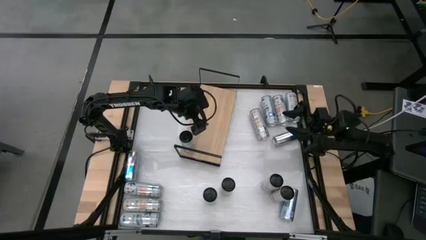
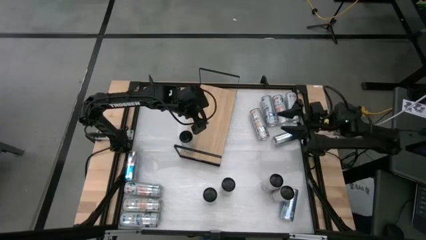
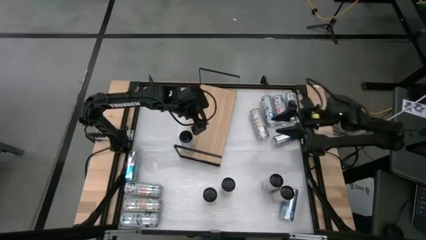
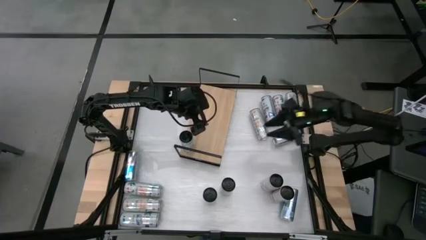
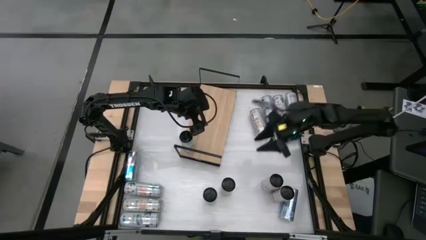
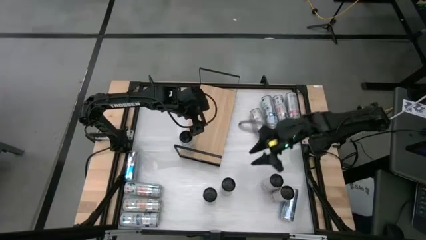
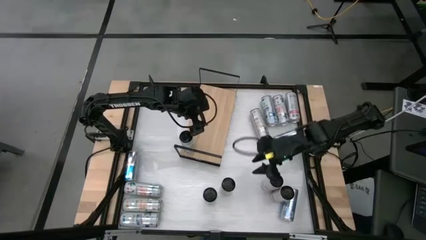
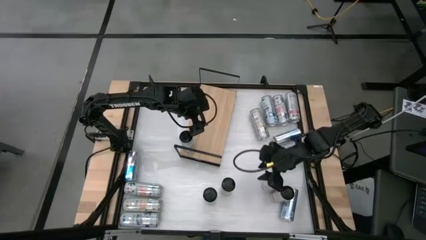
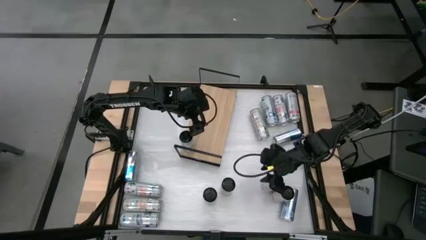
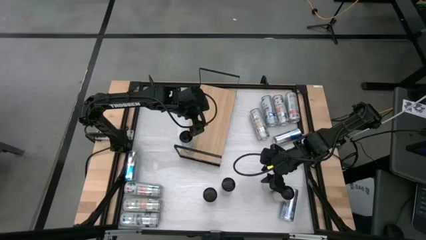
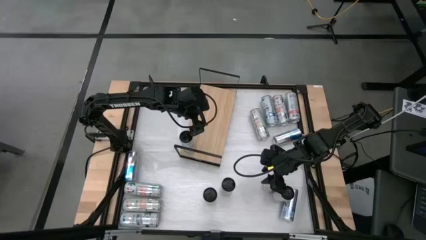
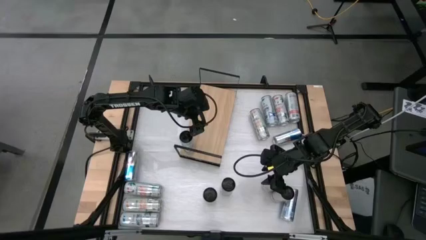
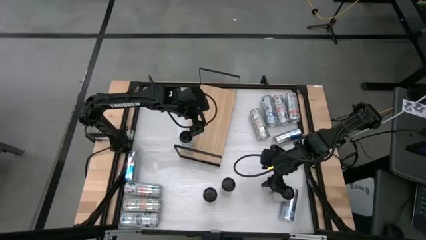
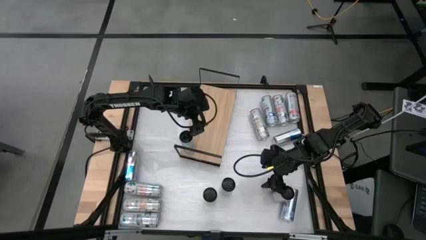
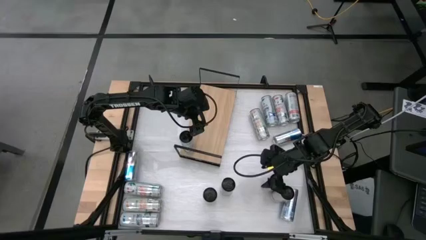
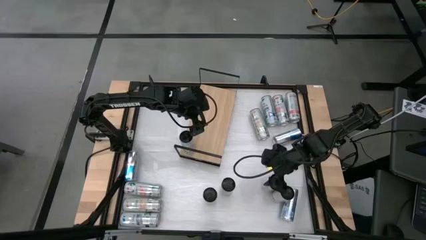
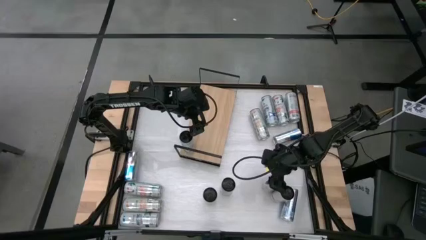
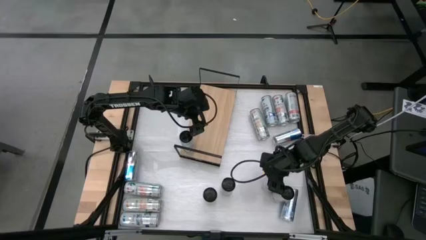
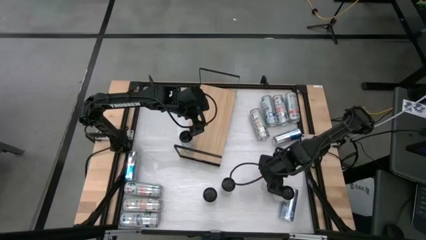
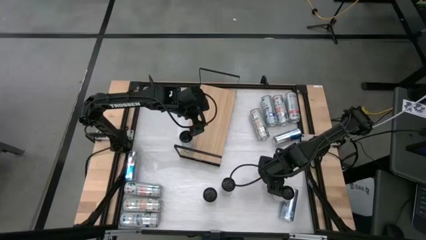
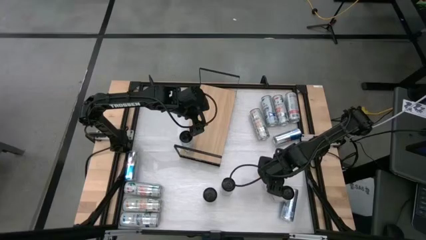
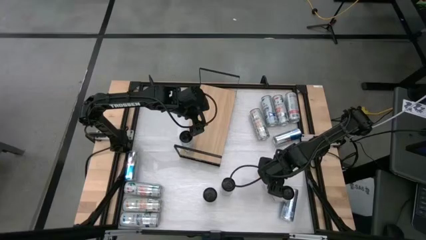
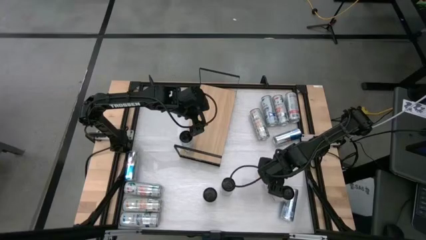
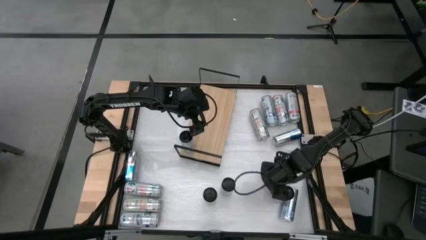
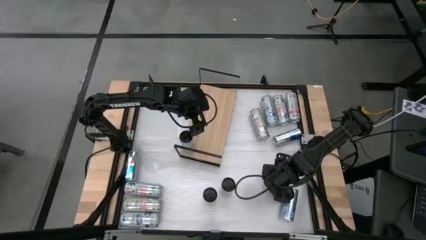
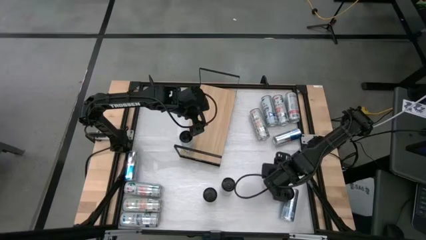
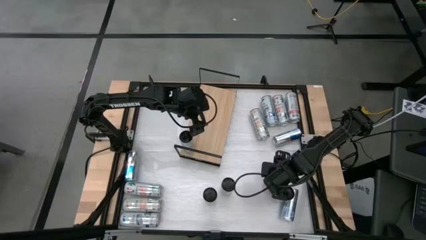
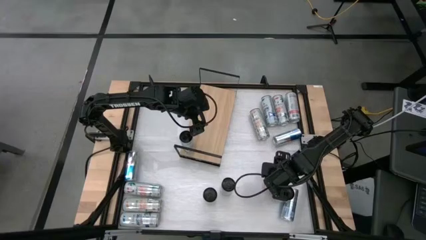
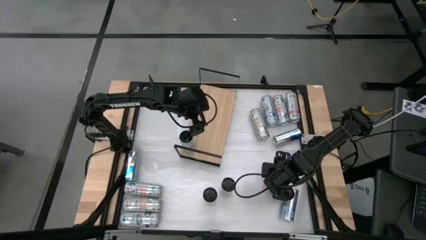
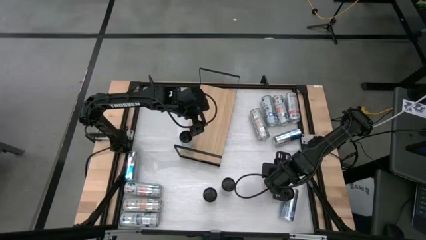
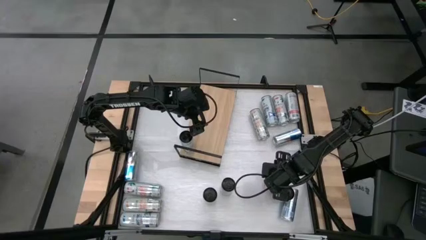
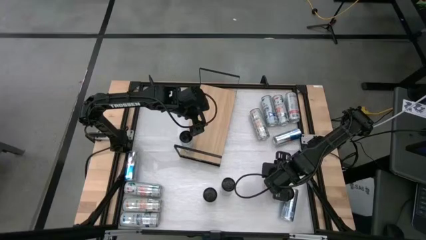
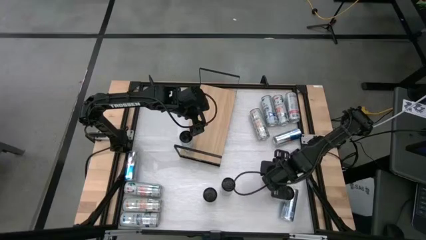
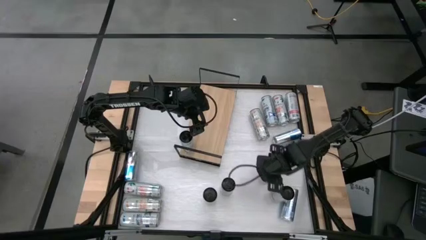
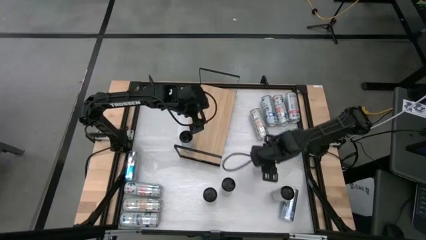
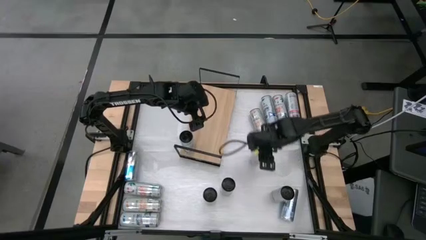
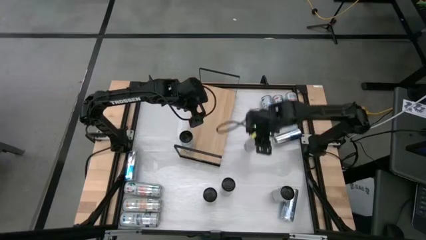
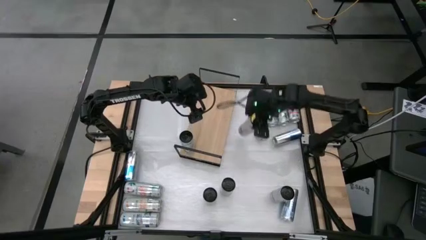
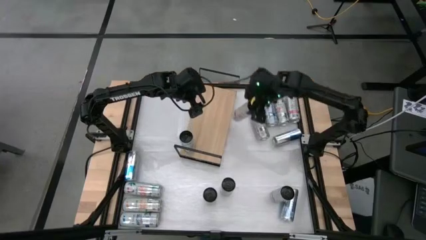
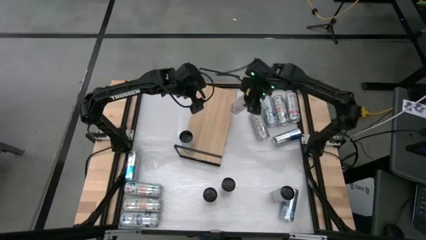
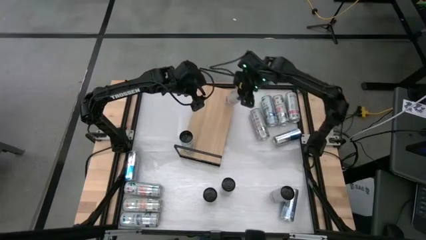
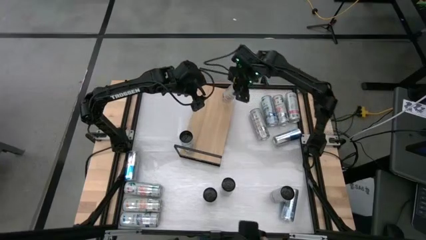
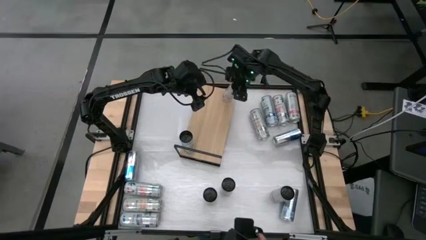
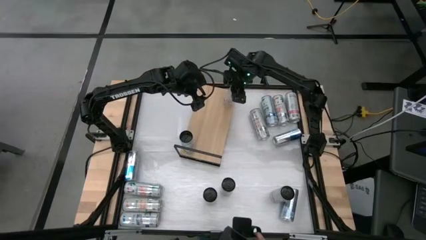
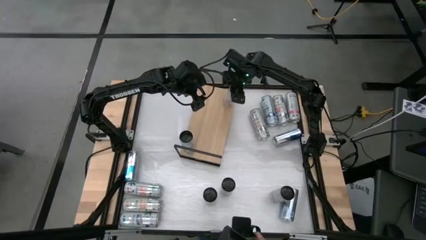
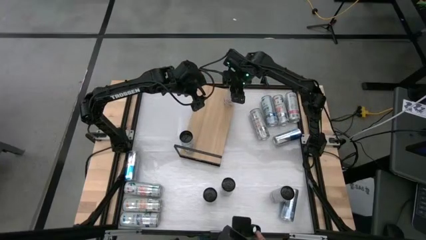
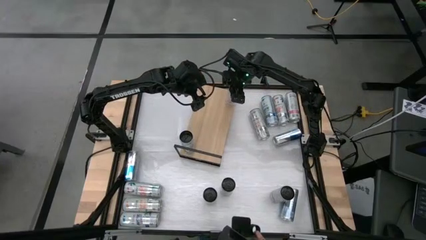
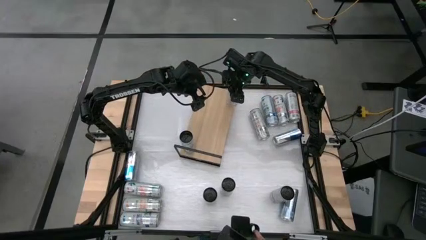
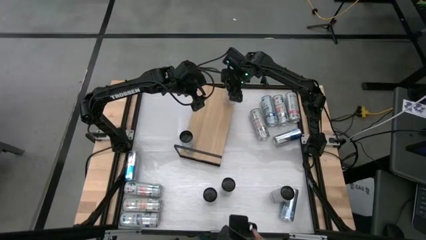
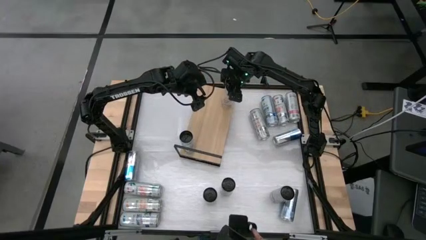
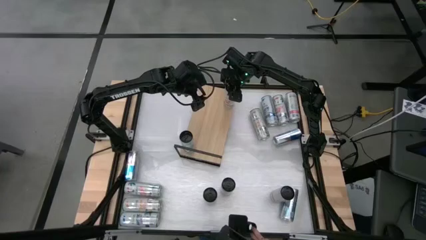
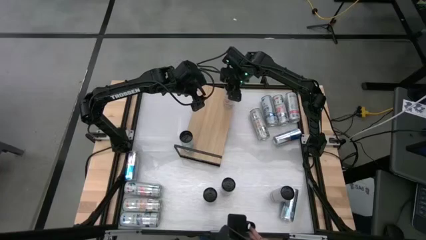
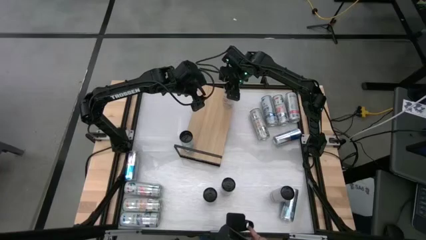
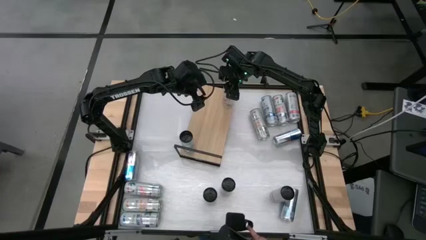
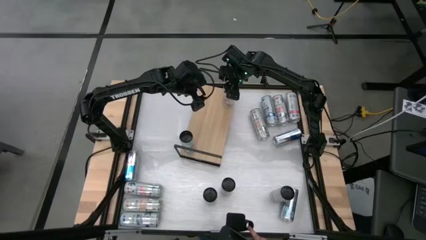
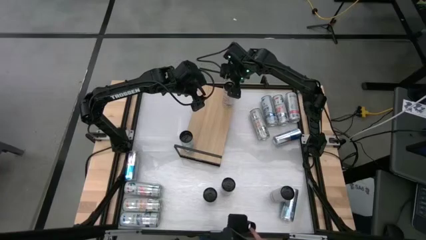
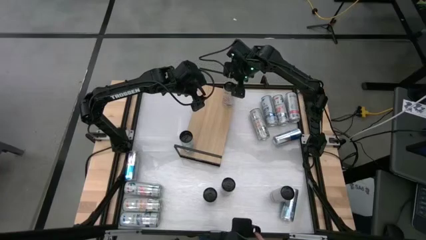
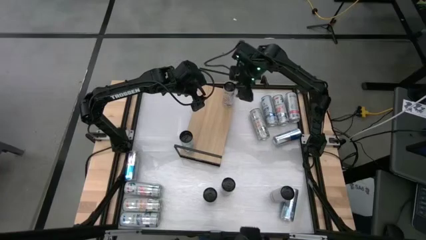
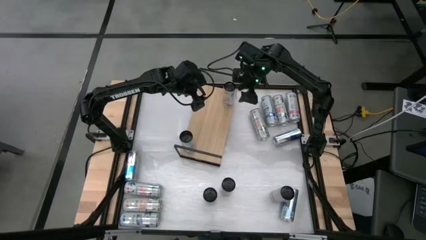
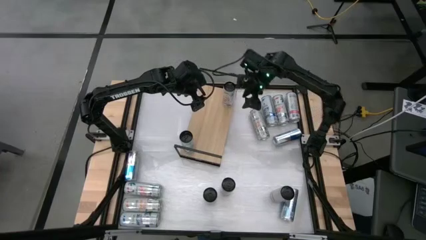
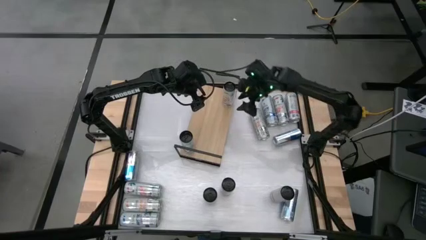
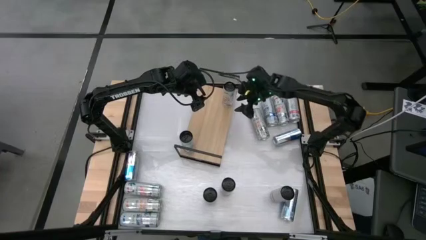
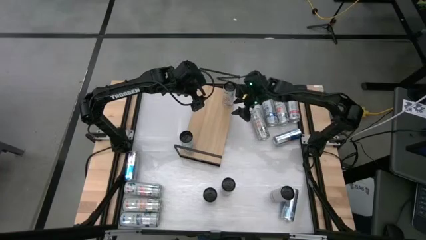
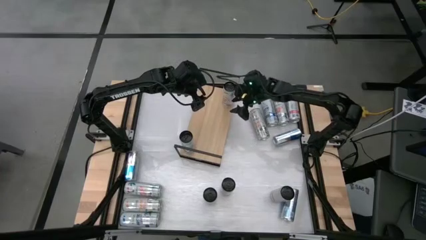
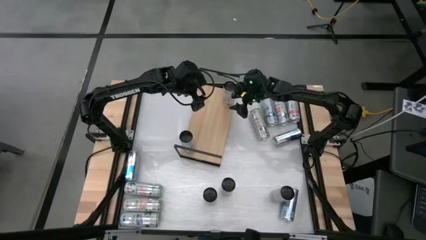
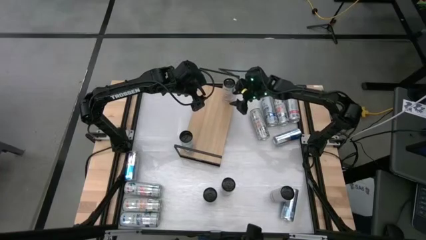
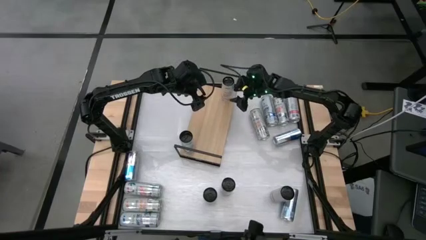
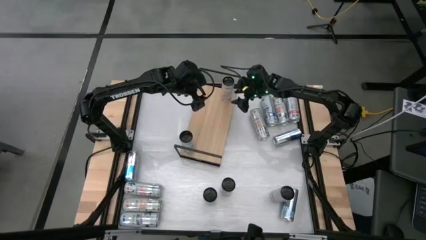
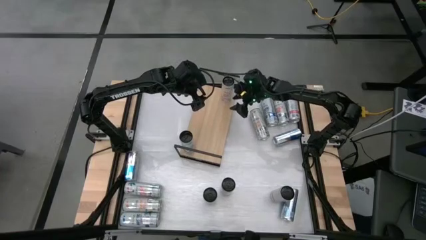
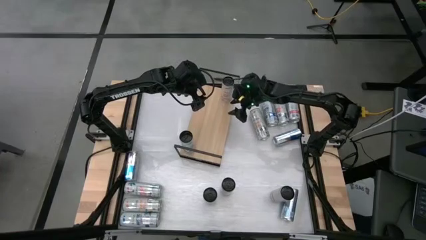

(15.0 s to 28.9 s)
Task: Place canned beverage on shelf
Put the bottom right pink soda can on the shelf
